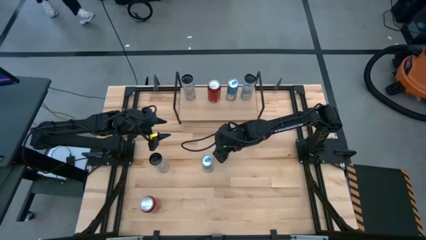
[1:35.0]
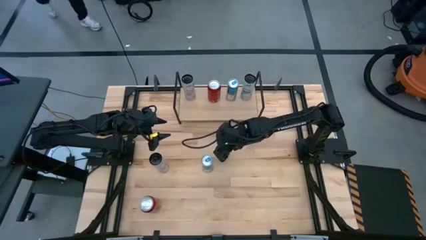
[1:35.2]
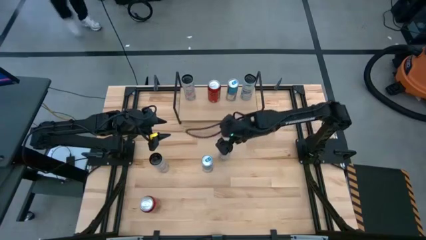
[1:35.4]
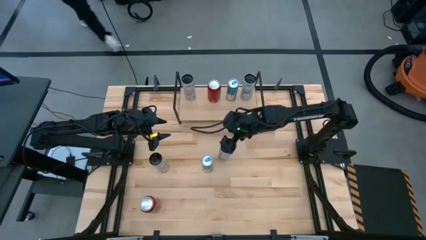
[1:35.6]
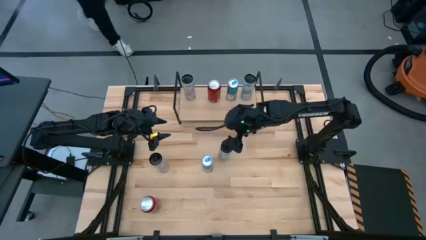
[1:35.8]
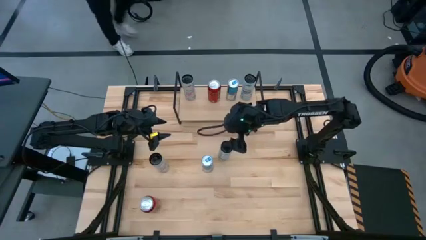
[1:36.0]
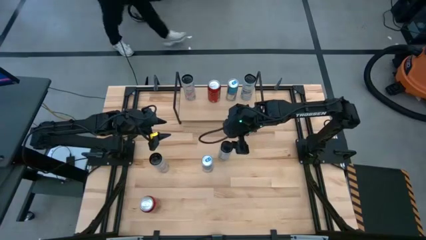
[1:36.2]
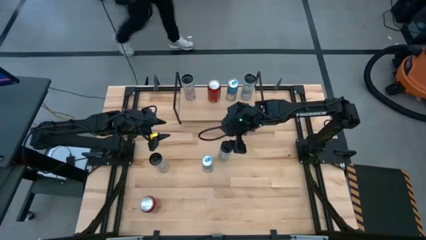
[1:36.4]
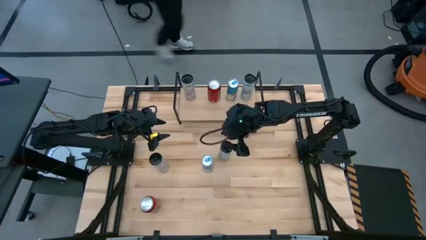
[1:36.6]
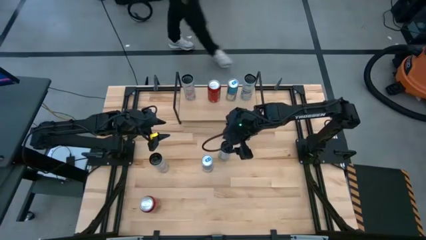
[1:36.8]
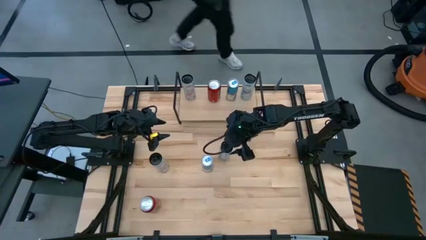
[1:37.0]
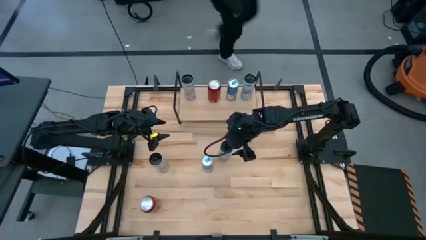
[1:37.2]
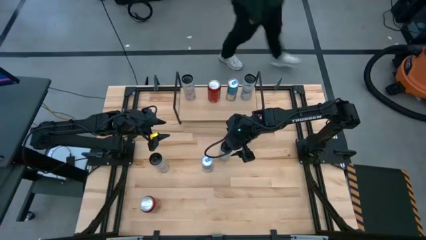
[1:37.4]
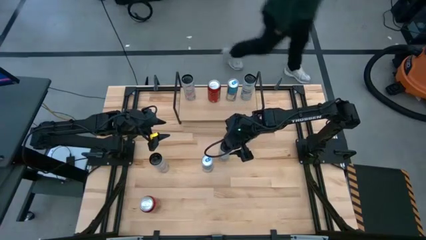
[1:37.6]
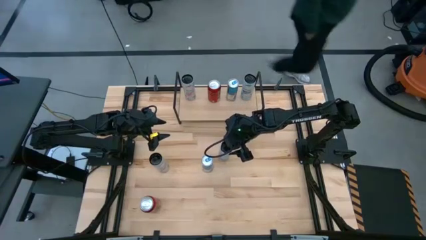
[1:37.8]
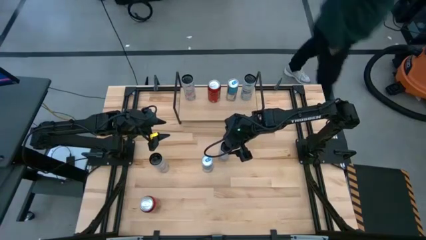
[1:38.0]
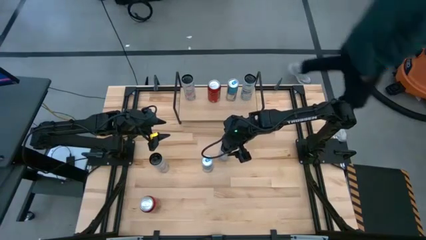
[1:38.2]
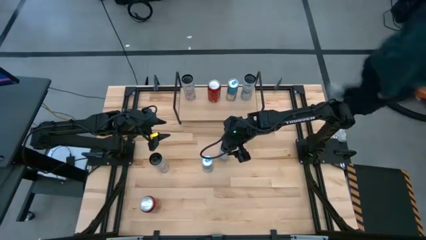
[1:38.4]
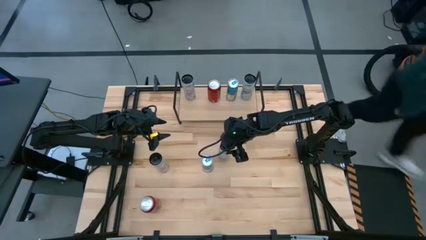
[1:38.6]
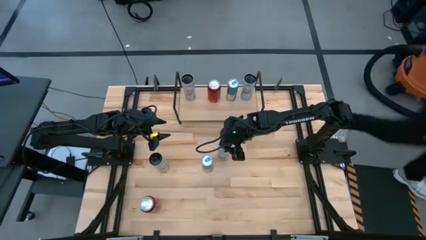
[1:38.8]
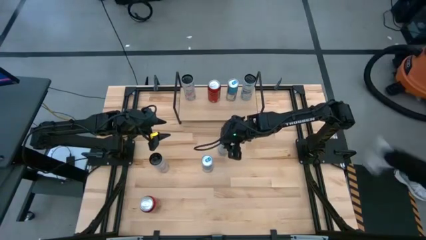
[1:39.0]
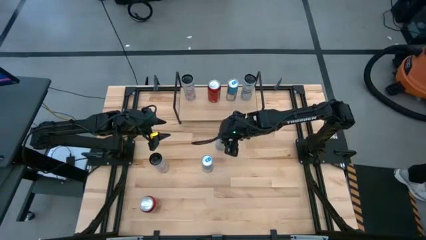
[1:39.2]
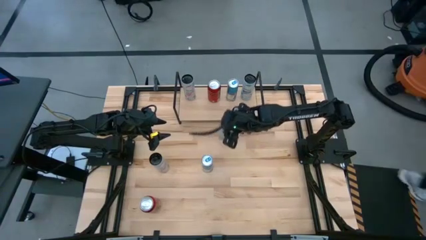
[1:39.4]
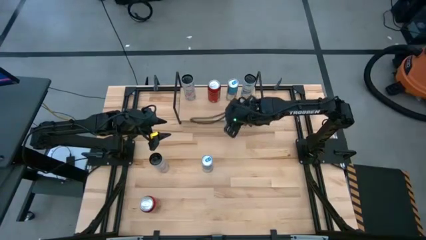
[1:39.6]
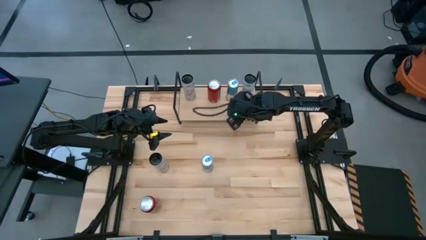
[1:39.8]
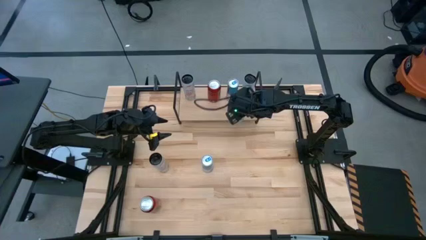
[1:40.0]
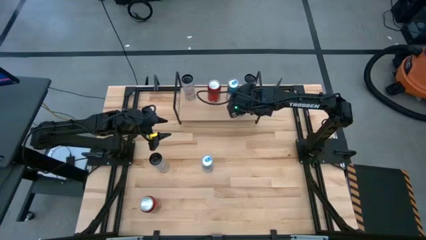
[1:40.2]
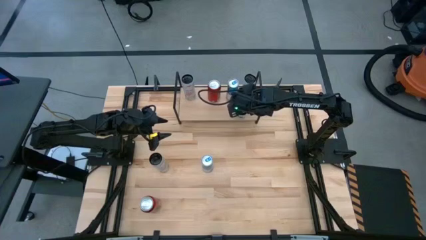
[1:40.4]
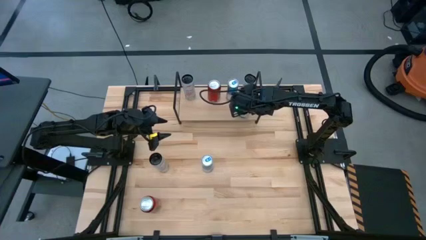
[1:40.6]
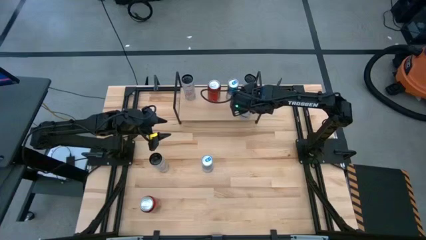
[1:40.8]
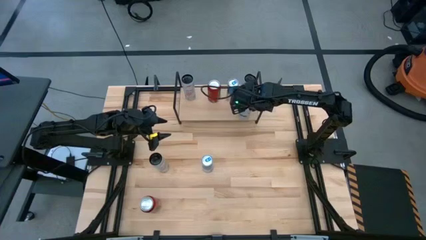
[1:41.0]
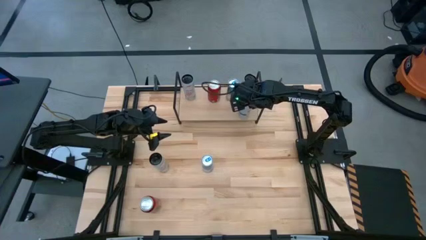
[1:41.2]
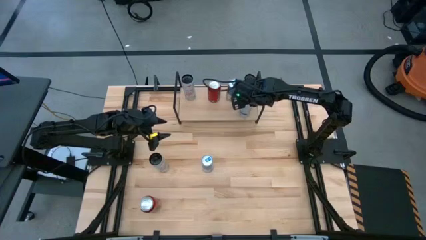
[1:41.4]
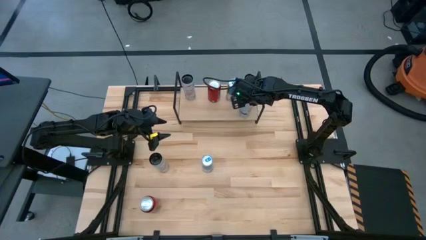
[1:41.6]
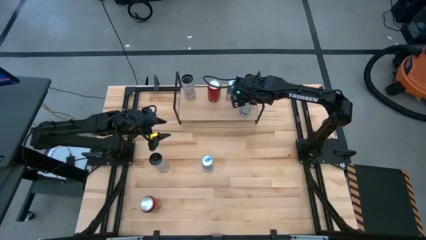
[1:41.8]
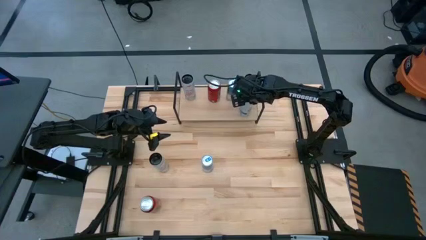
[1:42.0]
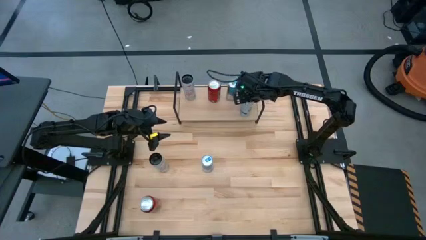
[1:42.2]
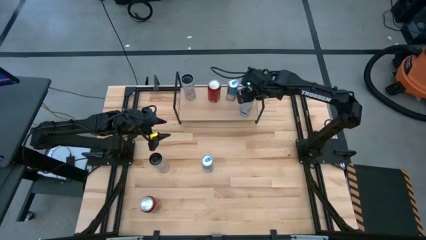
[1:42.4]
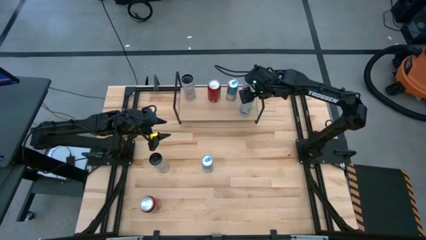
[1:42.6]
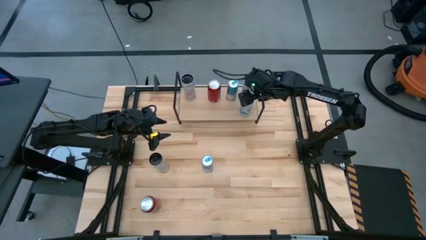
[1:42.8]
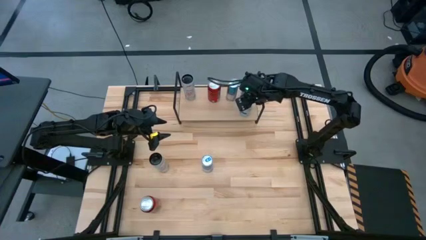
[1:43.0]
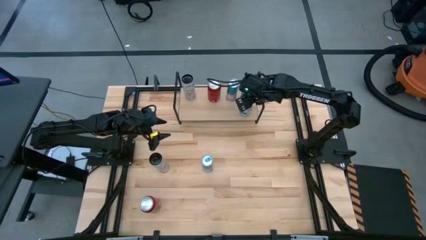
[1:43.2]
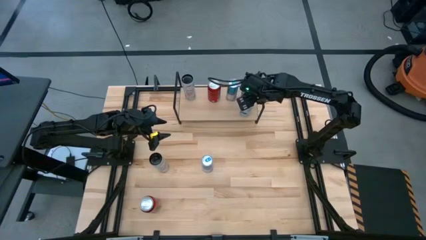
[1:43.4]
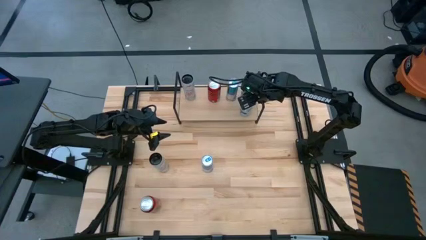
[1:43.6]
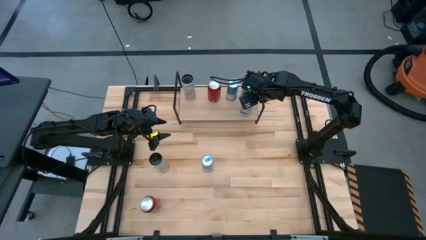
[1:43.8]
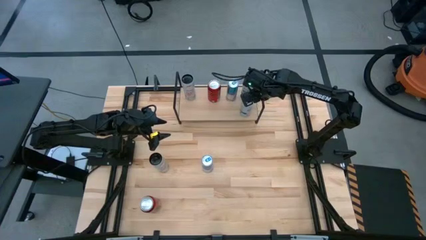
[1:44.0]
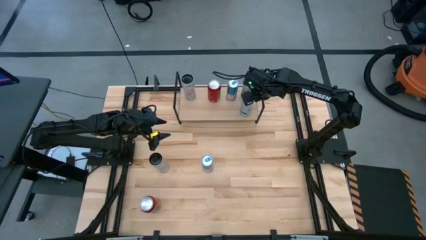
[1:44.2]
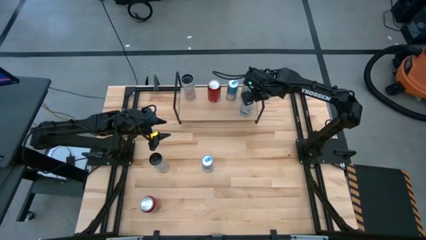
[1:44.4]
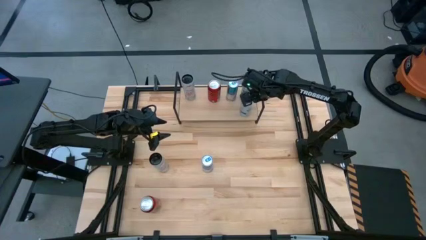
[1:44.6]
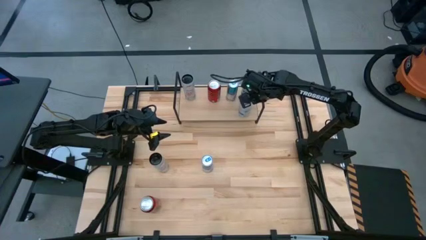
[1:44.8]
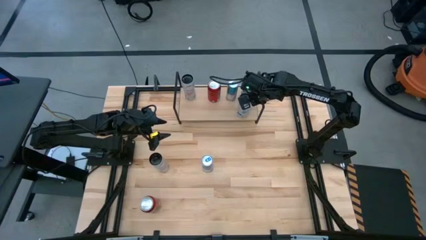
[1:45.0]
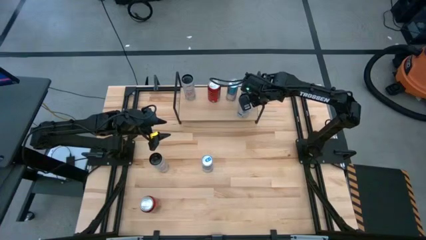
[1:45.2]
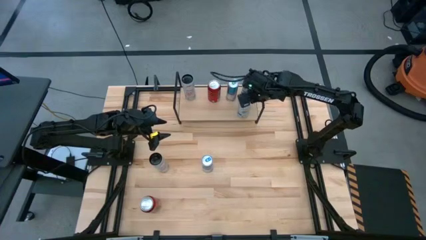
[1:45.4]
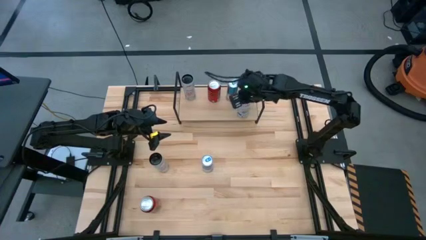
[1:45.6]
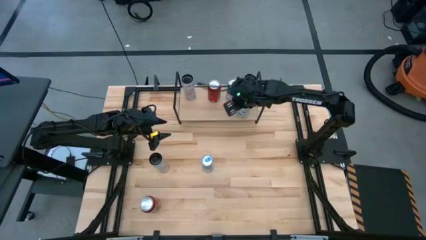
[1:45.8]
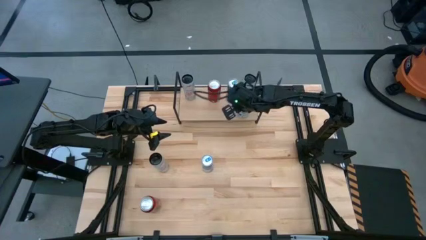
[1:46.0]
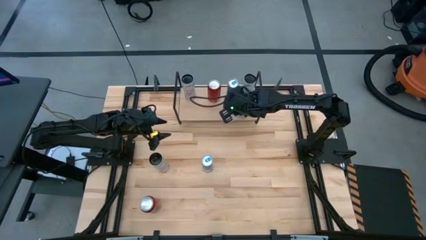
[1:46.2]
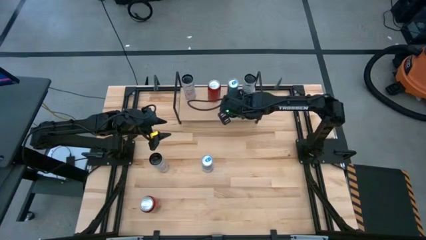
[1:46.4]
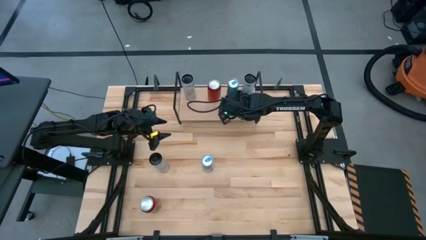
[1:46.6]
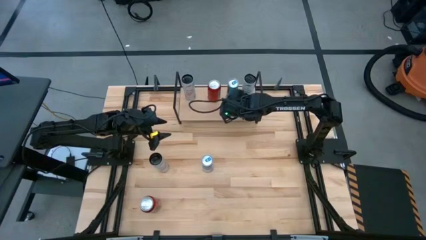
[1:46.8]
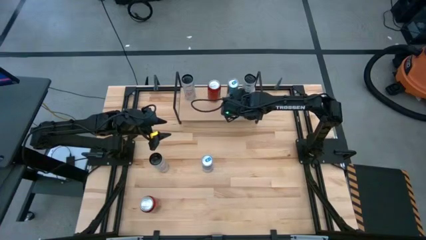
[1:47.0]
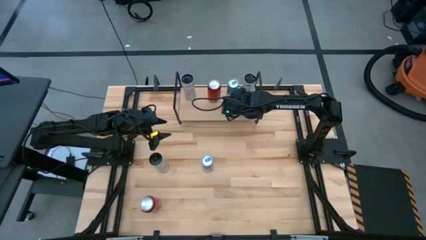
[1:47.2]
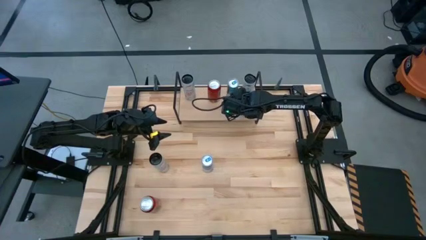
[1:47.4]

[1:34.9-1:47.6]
Task: Place canned beverage on shelf
Put the white blue soda can on the shelf aligned with the other white blue soda can

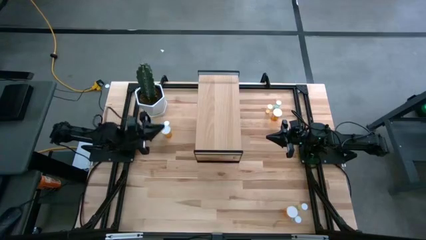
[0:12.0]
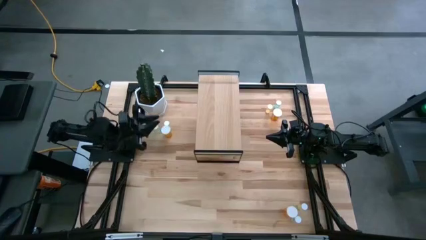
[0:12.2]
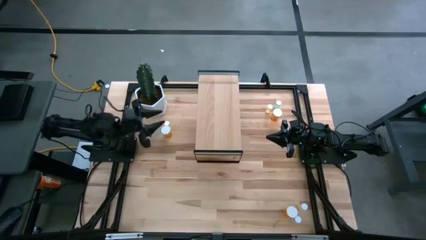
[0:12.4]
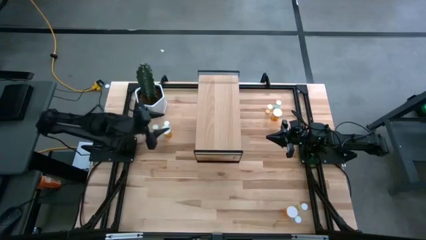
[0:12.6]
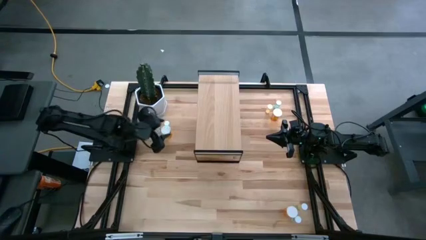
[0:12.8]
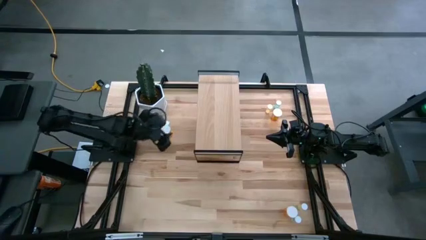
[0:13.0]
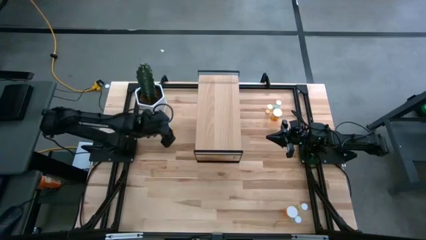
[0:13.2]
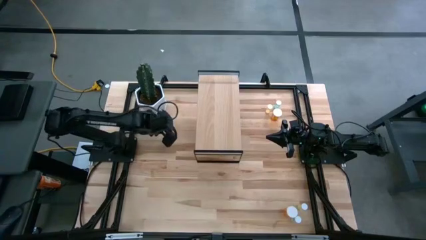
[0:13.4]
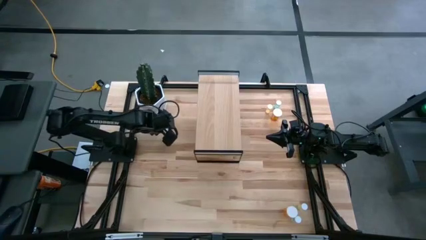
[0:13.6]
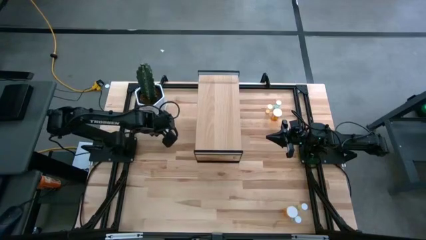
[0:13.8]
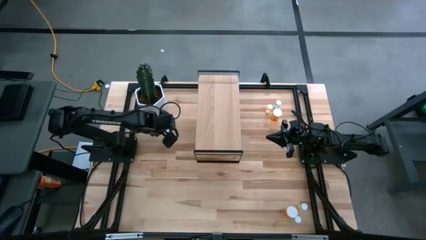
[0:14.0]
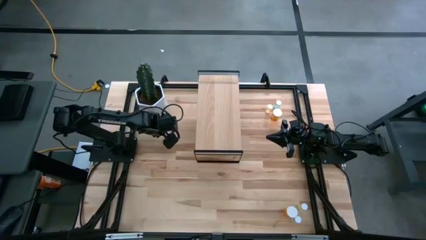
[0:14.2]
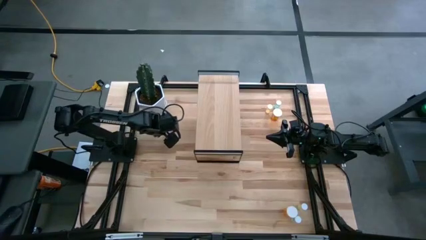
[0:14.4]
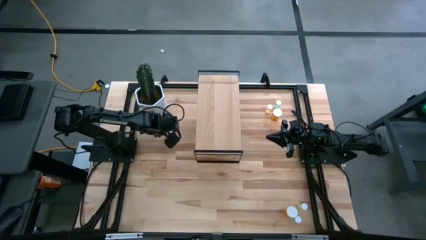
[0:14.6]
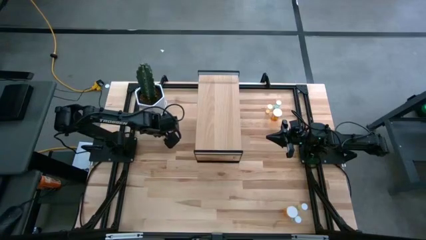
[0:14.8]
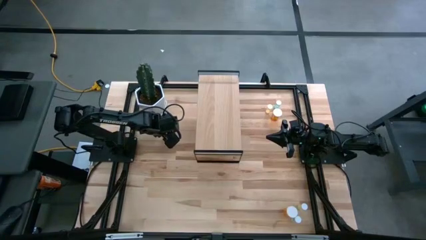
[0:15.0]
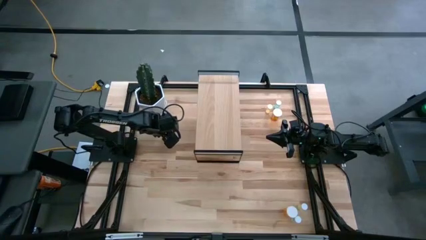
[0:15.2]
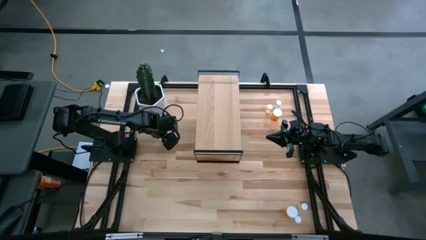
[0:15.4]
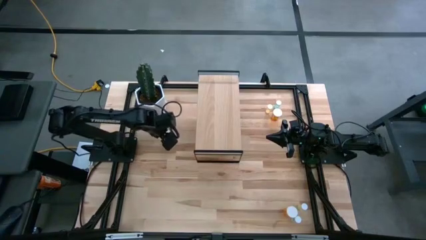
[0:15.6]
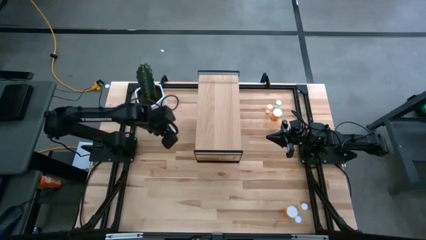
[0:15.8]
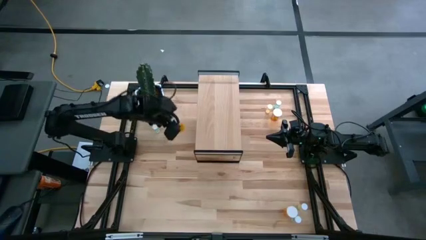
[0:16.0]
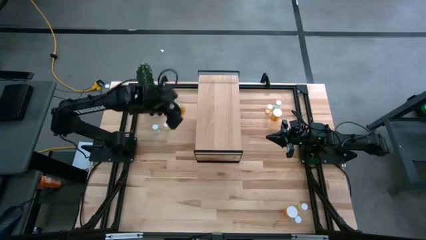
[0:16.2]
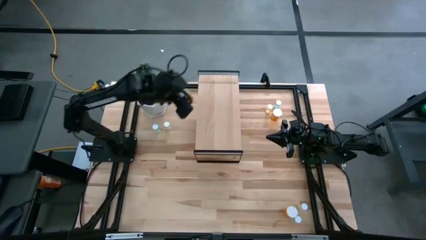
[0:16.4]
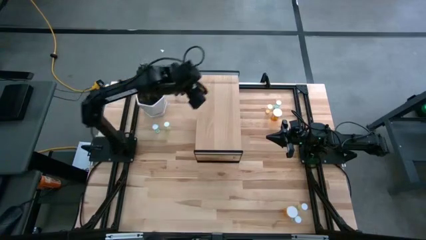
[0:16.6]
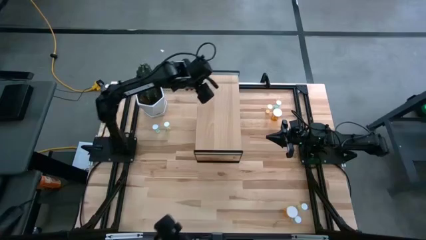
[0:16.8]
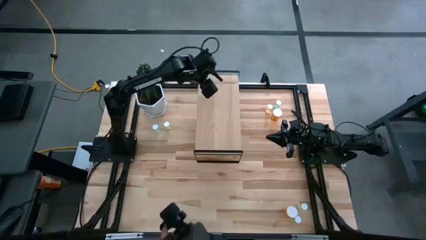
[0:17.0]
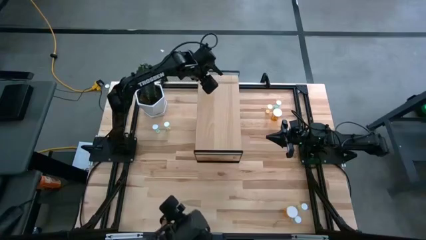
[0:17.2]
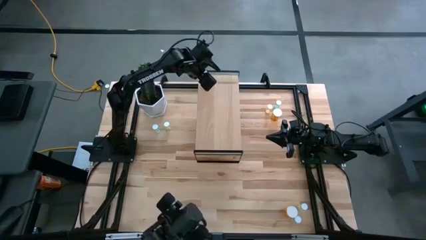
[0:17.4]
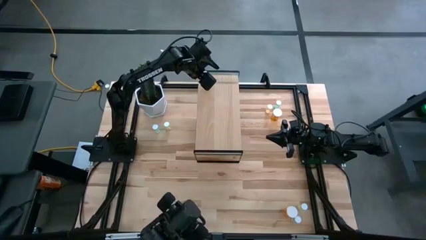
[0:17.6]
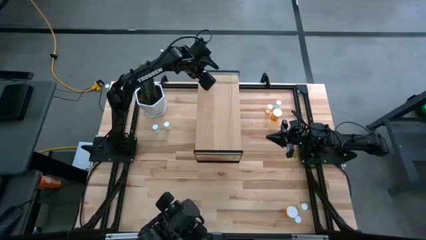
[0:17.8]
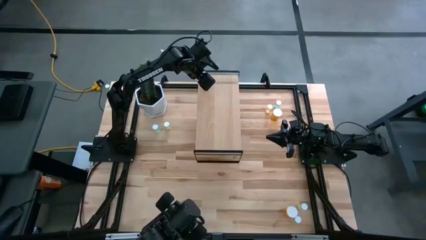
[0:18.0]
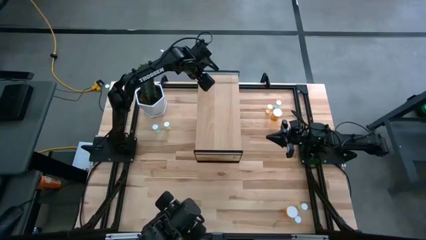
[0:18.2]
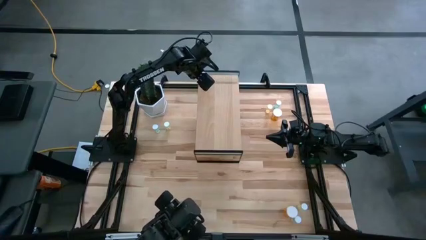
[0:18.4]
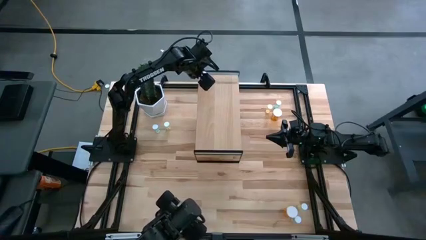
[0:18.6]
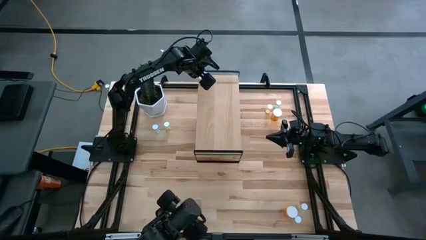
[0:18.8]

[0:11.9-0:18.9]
Task: Pick and place medicine bottles onto shelf by color
Put the middle orange pill bottle on the shelf
